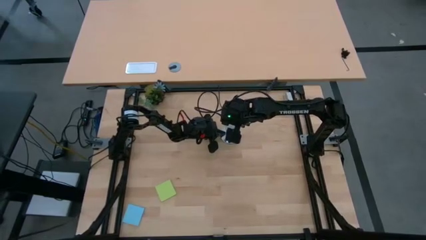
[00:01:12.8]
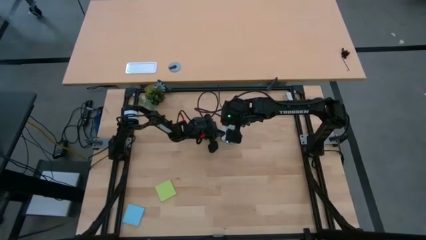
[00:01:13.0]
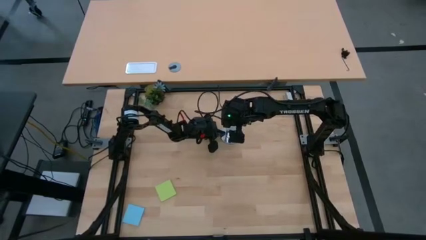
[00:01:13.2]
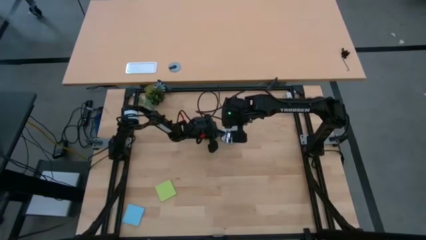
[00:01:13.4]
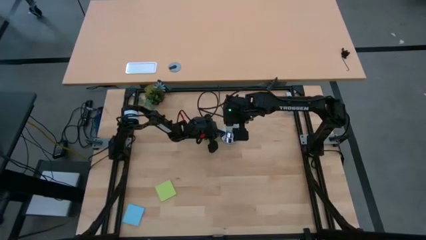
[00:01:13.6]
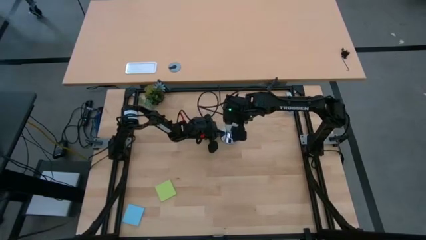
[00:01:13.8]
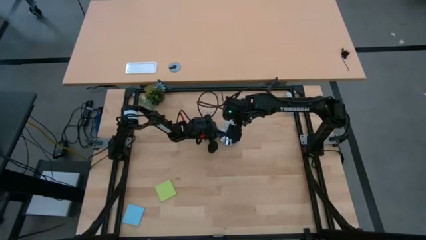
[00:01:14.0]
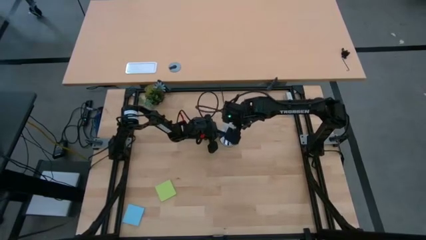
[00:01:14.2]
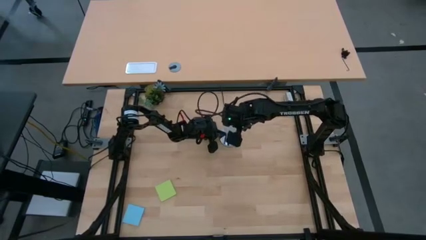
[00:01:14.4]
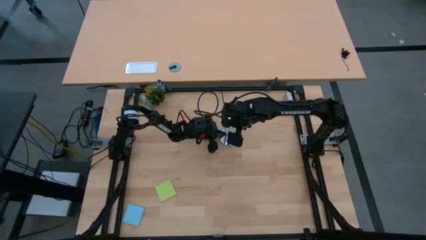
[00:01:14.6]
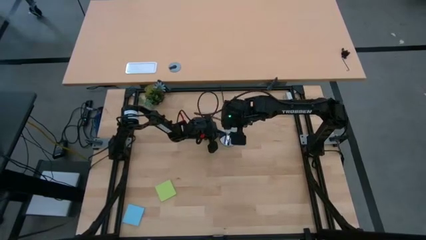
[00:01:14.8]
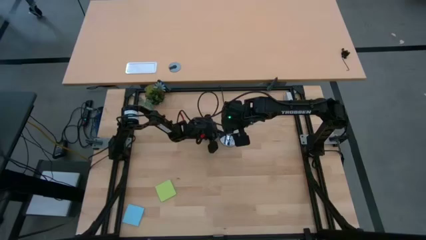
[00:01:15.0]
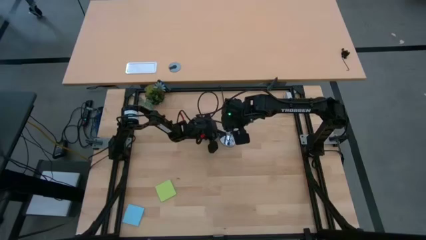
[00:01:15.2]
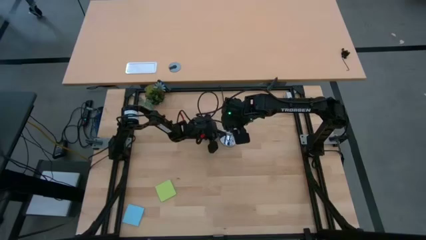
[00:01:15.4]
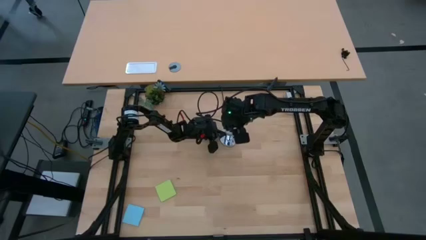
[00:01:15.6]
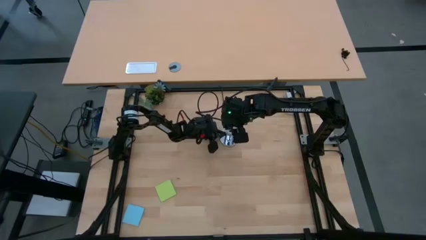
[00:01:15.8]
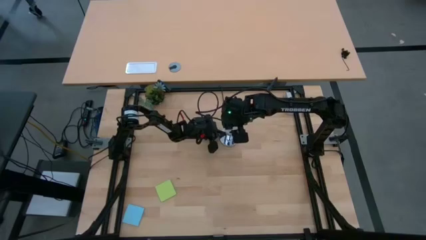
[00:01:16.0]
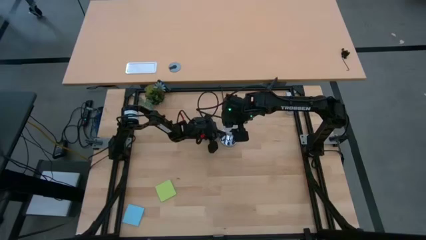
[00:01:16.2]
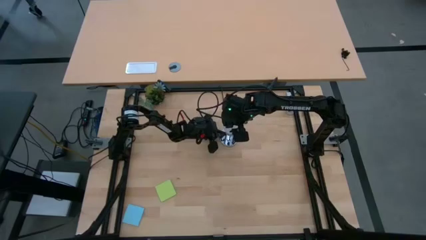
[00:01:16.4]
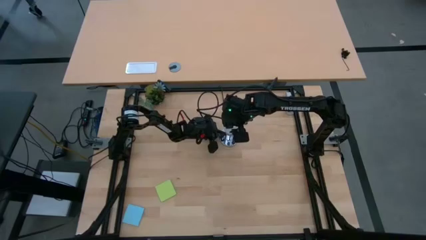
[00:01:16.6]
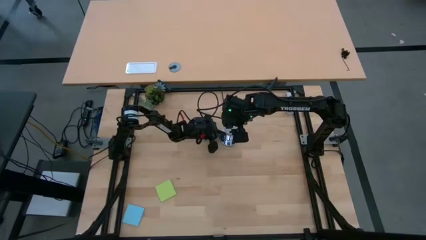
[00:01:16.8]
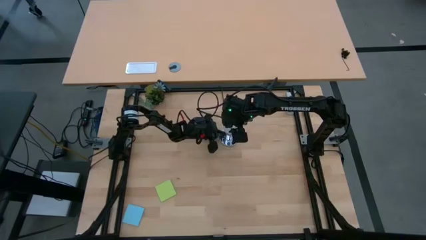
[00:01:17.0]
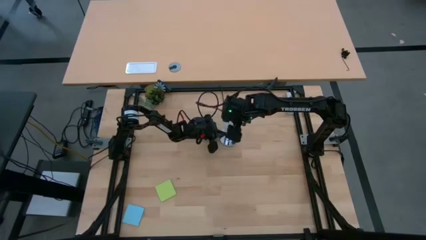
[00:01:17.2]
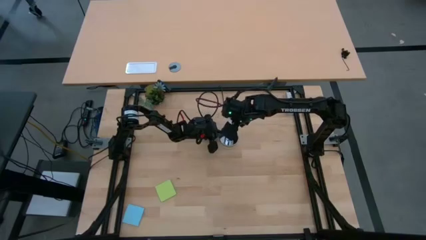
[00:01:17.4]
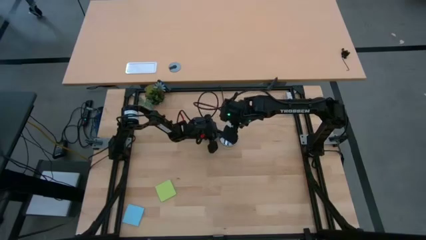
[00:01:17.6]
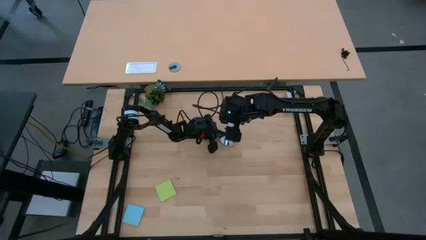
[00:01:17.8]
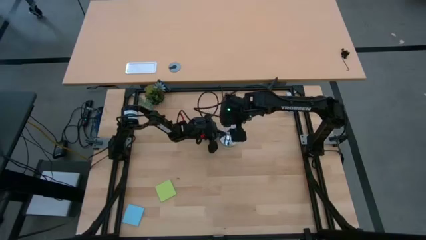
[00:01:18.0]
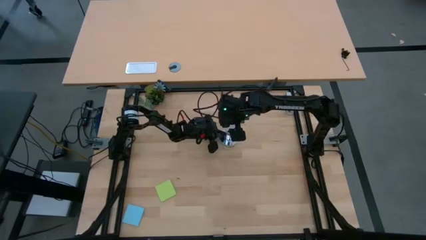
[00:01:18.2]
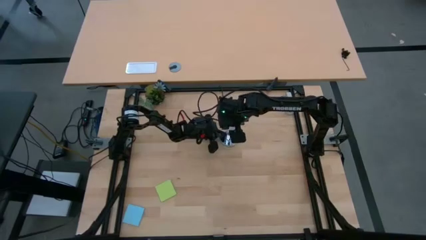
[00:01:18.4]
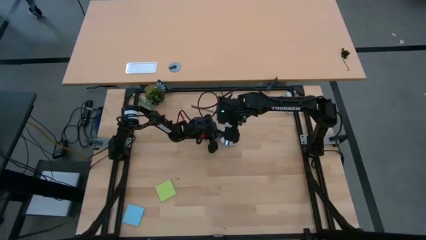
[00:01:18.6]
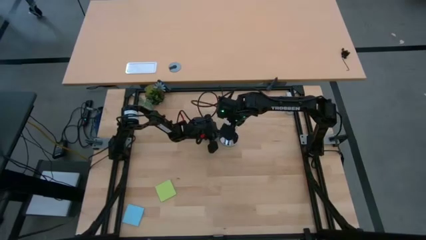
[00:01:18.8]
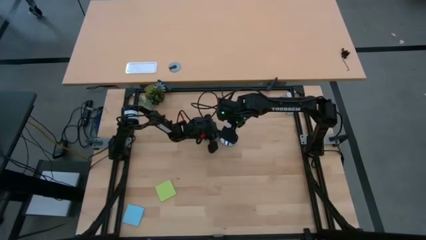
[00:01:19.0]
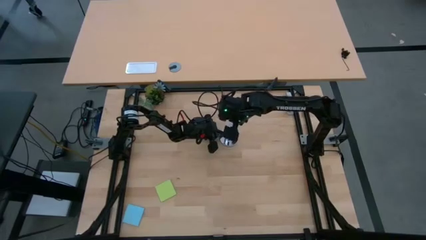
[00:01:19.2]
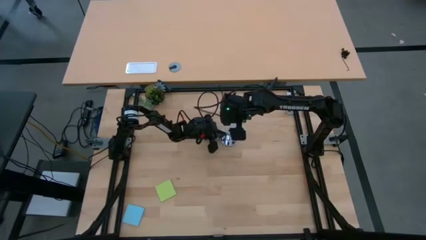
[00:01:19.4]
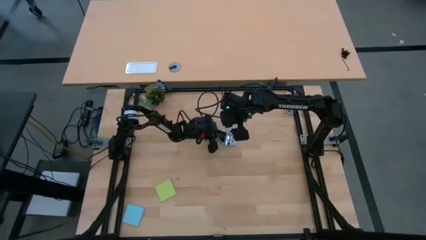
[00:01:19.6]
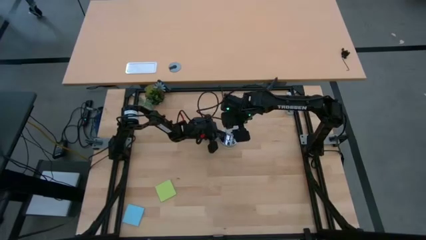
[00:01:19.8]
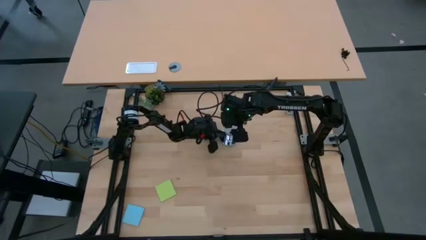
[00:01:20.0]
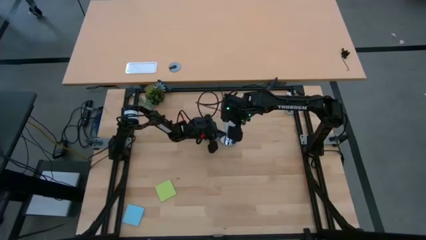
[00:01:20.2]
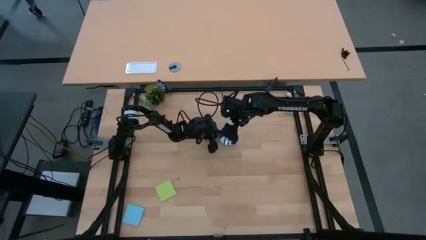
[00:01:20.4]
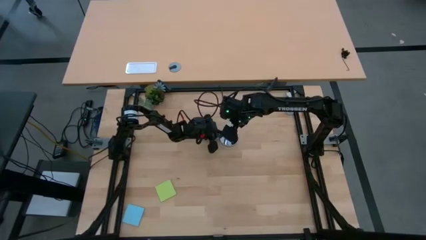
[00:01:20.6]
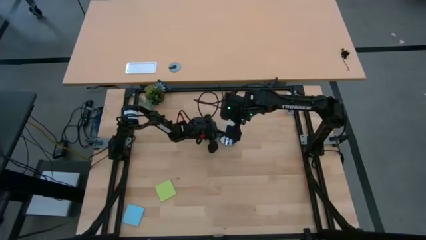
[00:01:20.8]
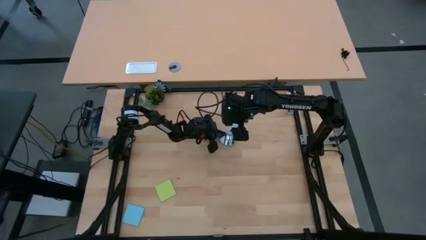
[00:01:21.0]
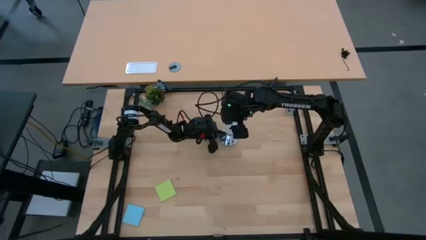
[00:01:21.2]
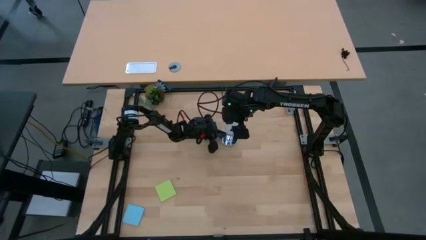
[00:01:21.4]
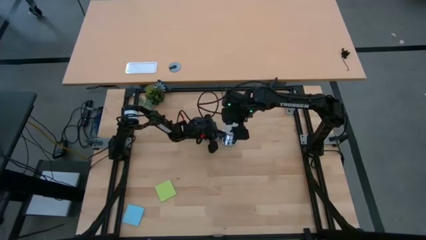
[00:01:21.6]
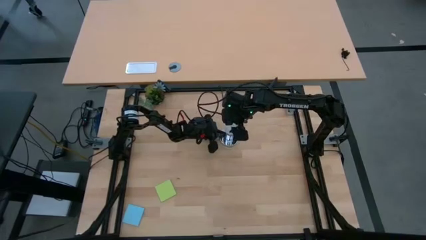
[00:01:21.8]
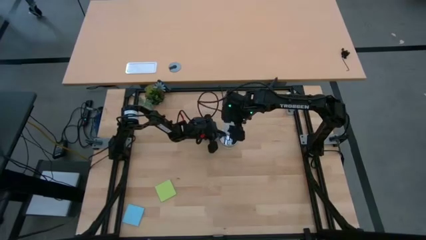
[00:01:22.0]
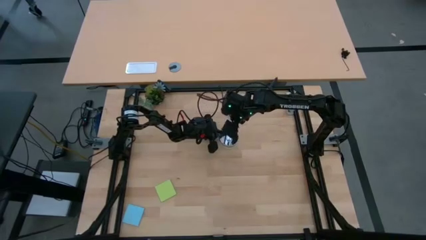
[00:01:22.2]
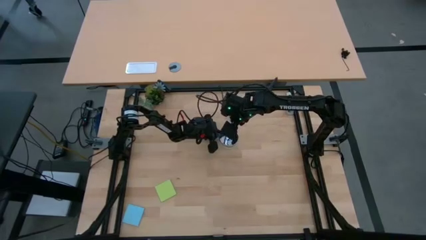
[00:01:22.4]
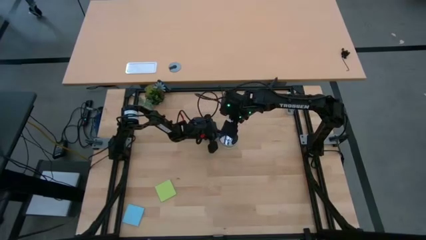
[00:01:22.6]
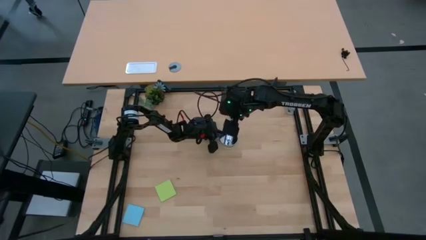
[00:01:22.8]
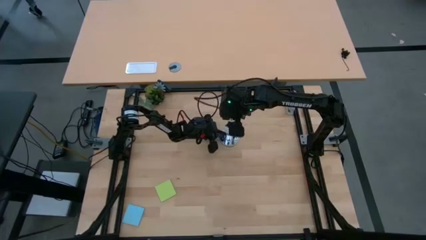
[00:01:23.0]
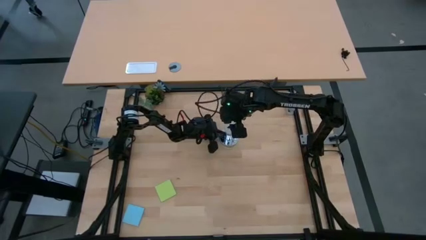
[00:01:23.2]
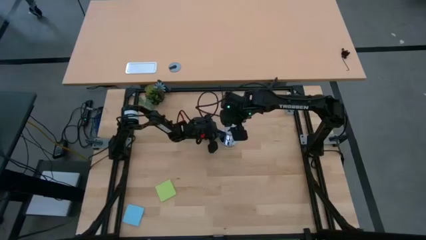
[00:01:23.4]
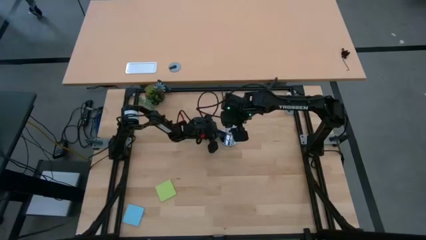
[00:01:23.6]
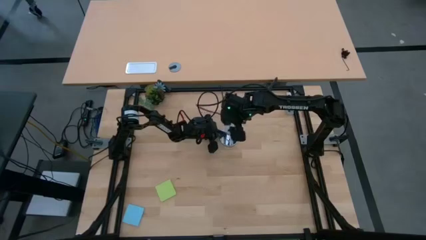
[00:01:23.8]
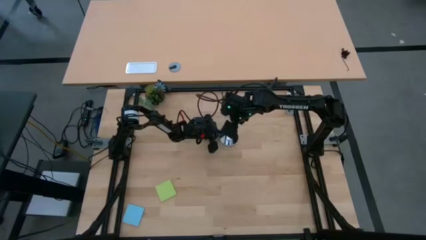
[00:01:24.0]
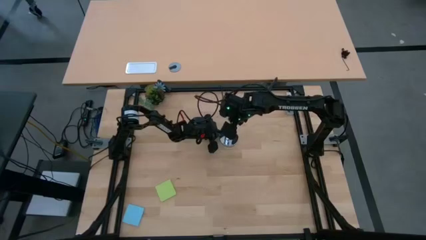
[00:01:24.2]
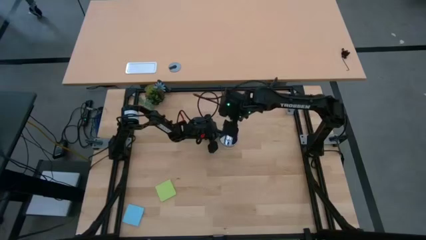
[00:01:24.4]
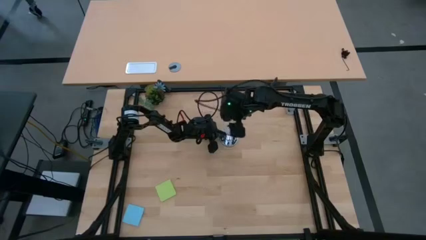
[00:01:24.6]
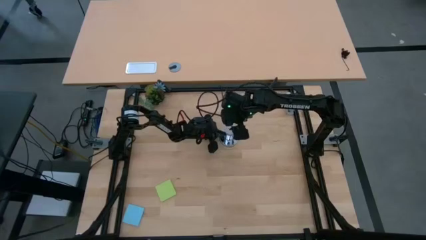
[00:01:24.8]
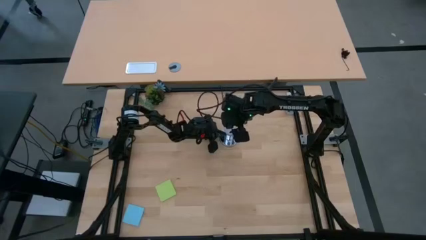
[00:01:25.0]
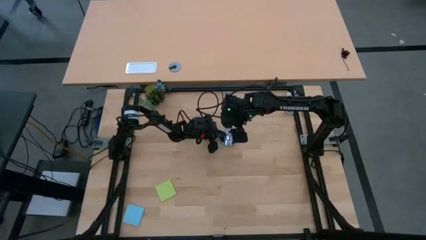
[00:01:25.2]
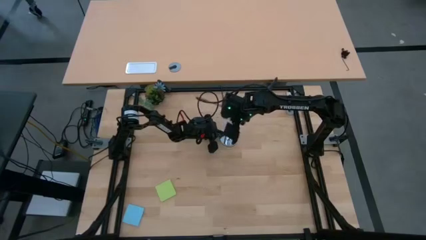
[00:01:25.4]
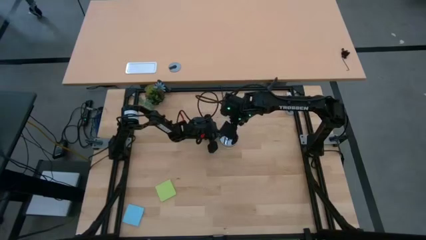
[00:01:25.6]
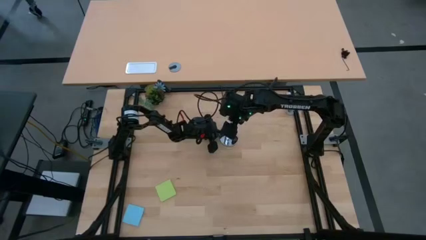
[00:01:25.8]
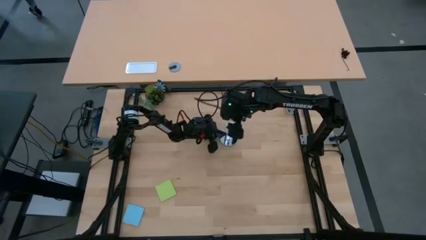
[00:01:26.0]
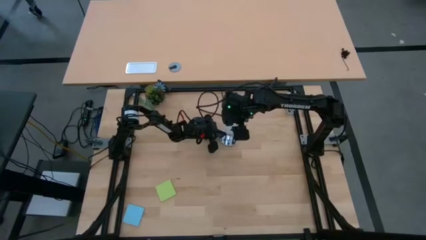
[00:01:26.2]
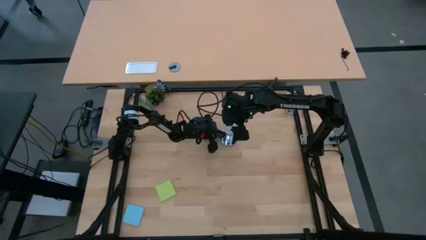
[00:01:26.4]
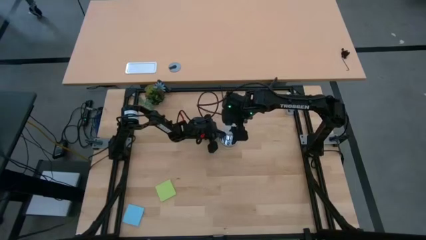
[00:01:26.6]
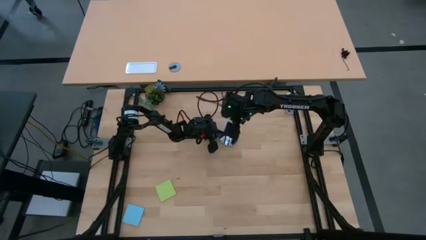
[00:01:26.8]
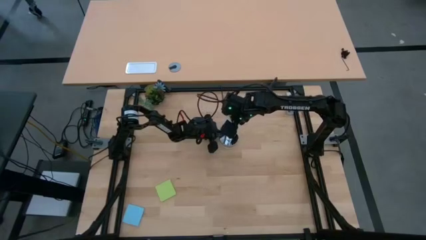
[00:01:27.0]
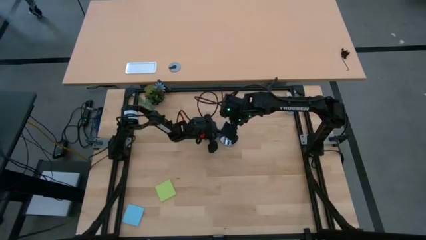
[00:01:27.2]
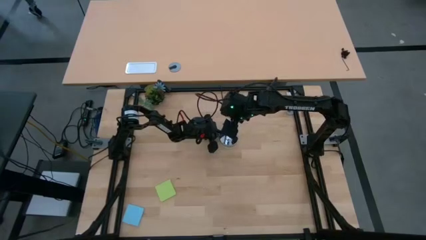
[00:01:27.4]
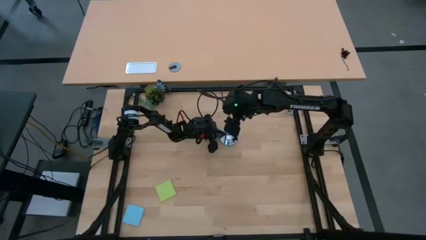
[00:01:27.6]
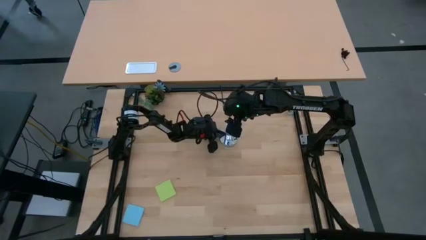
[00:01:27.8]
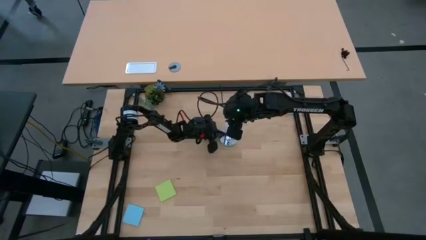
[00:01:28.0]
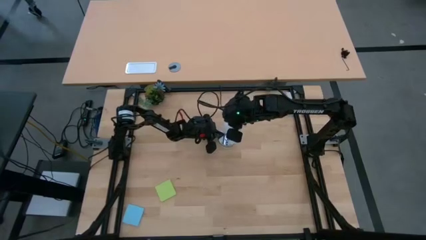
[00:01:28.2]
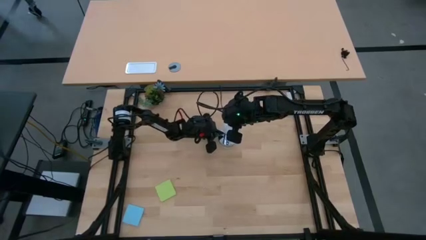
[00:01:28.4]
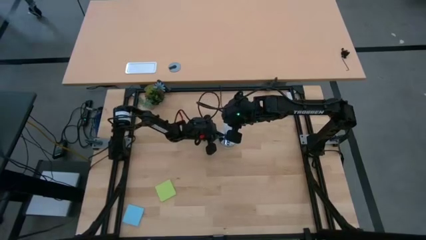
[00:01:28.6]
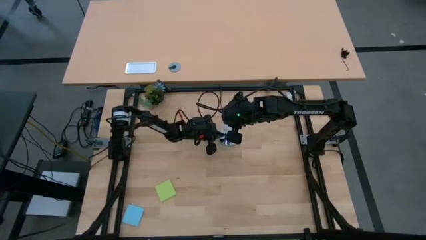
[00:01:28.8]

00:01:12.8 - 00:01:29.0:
Task: Screw lightbulb
Insert the lightbulb into the lamp
